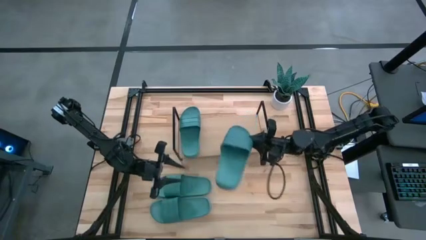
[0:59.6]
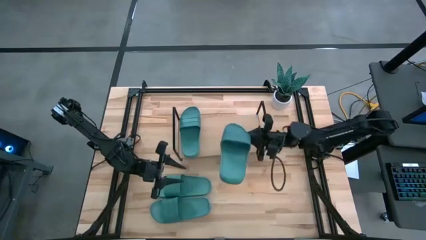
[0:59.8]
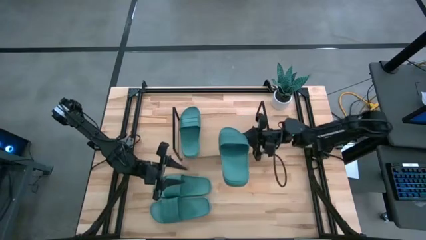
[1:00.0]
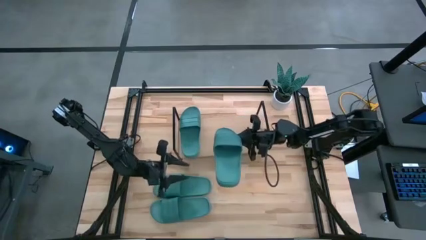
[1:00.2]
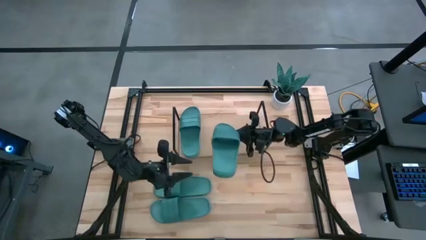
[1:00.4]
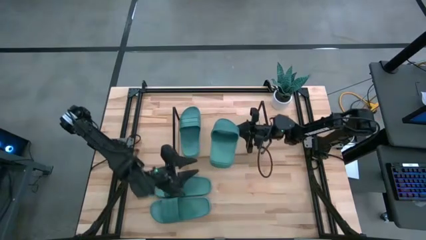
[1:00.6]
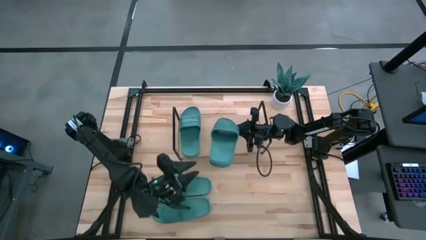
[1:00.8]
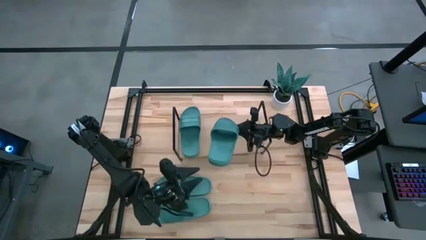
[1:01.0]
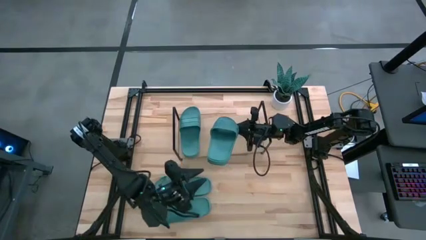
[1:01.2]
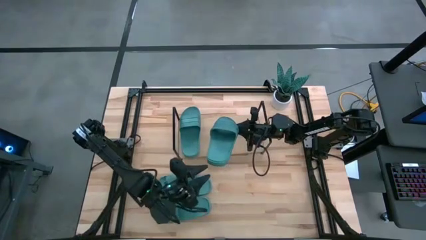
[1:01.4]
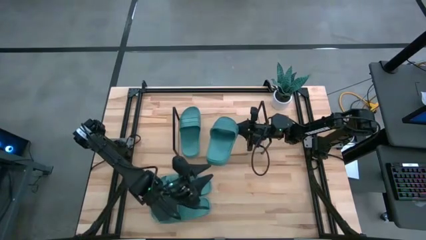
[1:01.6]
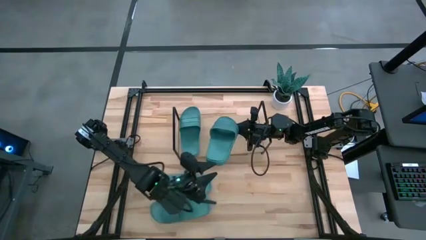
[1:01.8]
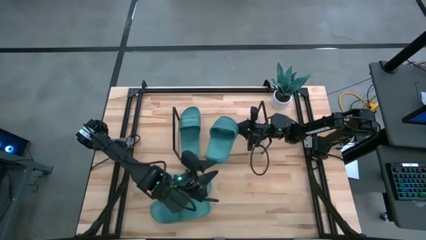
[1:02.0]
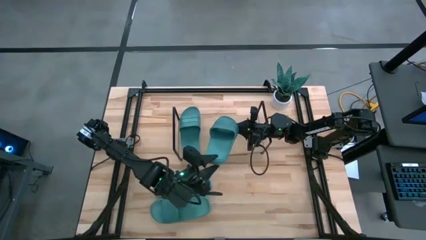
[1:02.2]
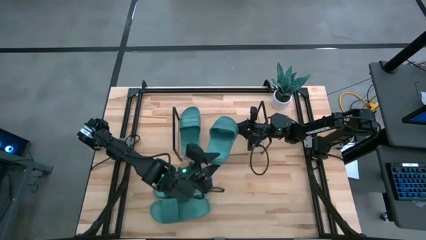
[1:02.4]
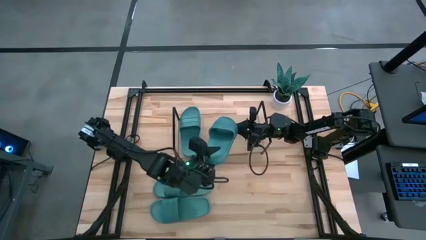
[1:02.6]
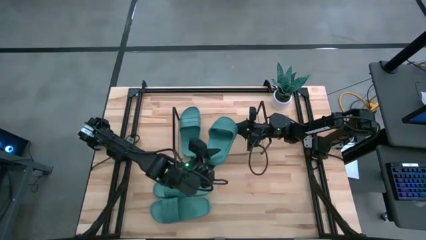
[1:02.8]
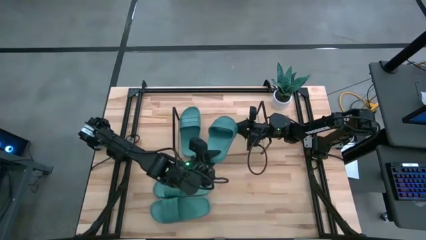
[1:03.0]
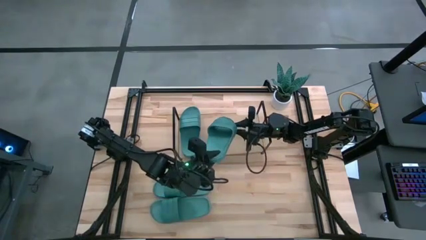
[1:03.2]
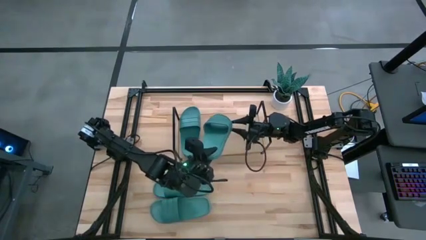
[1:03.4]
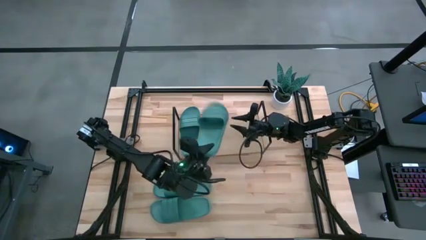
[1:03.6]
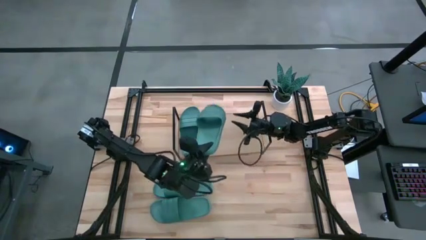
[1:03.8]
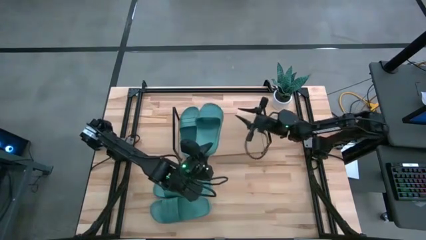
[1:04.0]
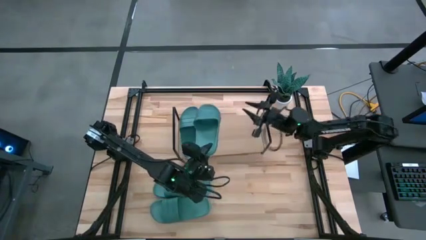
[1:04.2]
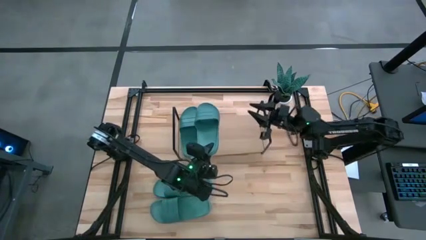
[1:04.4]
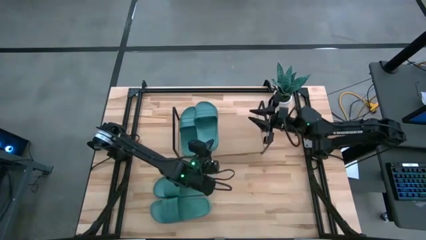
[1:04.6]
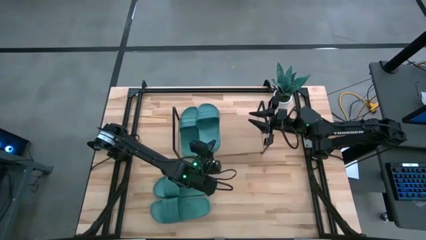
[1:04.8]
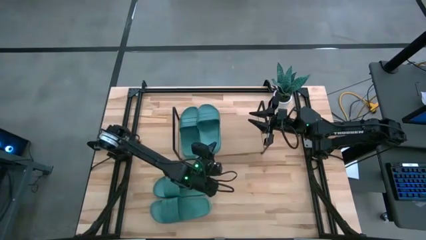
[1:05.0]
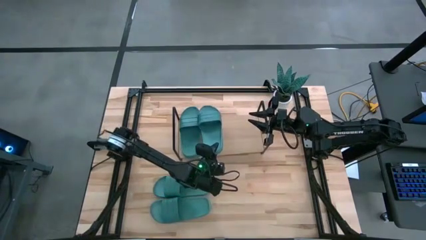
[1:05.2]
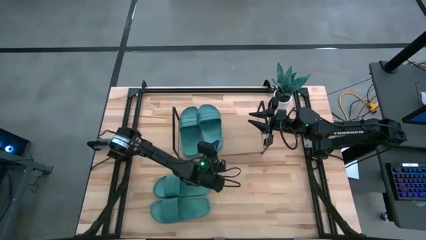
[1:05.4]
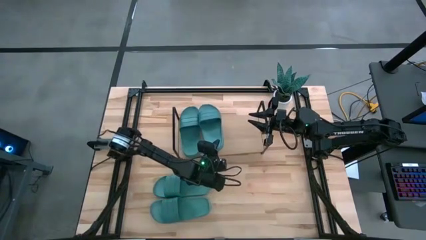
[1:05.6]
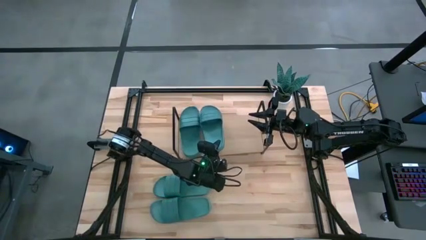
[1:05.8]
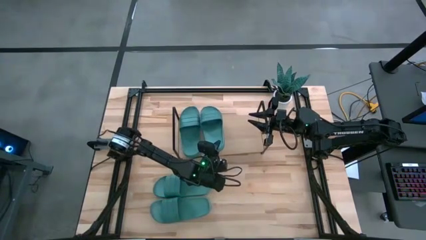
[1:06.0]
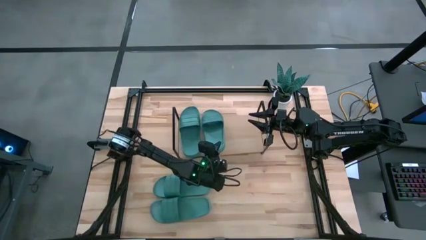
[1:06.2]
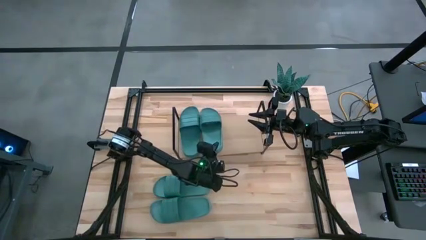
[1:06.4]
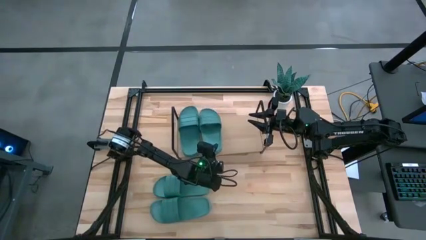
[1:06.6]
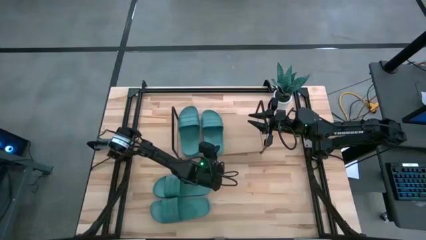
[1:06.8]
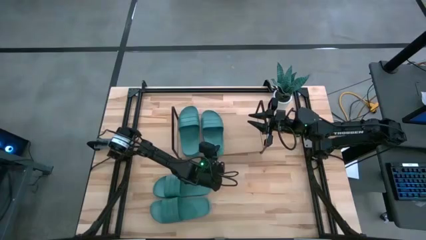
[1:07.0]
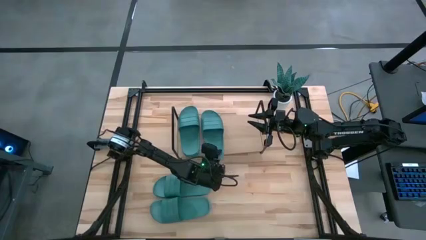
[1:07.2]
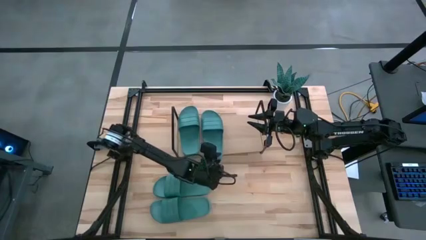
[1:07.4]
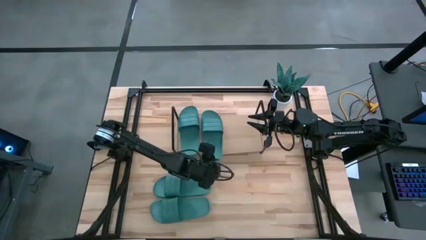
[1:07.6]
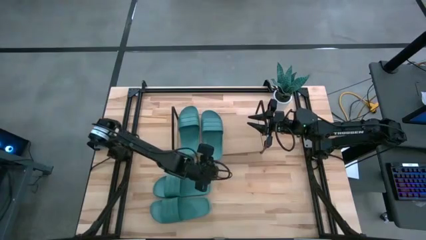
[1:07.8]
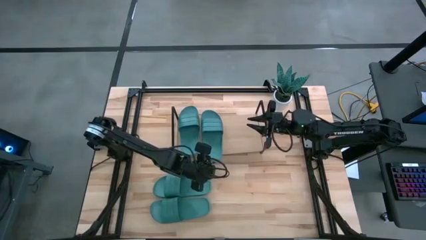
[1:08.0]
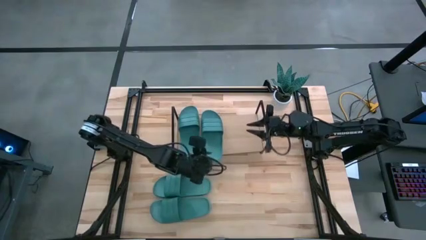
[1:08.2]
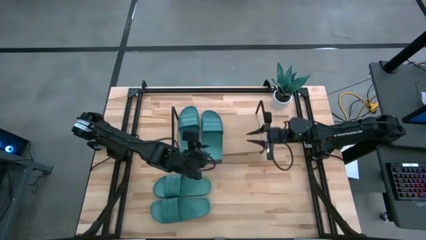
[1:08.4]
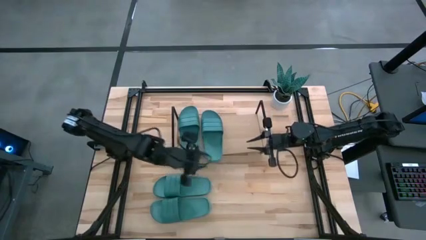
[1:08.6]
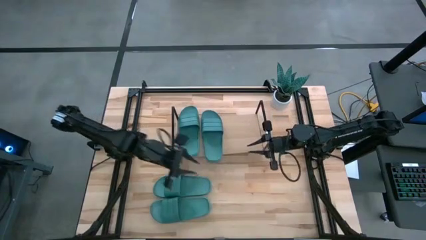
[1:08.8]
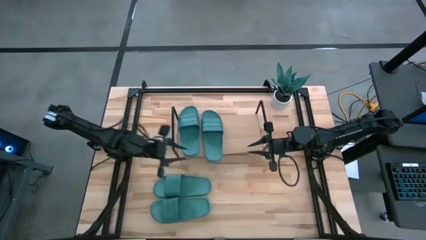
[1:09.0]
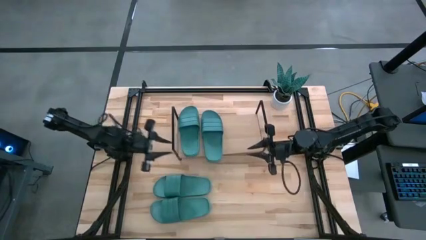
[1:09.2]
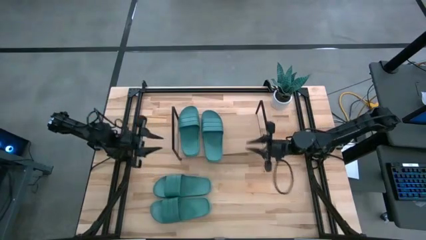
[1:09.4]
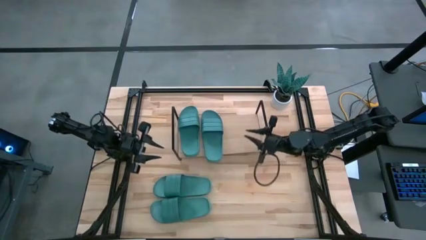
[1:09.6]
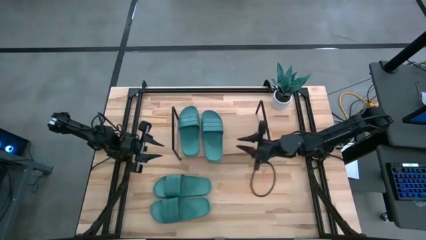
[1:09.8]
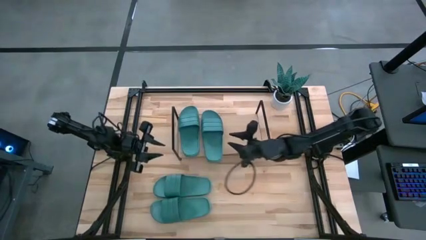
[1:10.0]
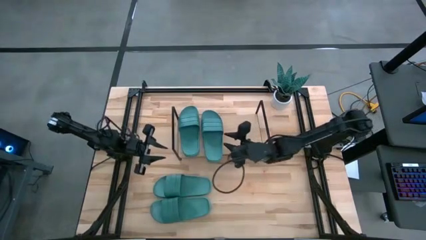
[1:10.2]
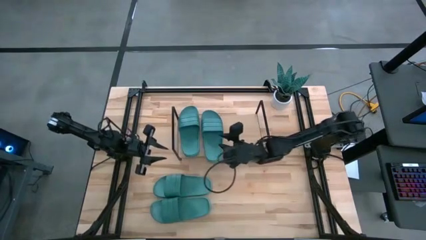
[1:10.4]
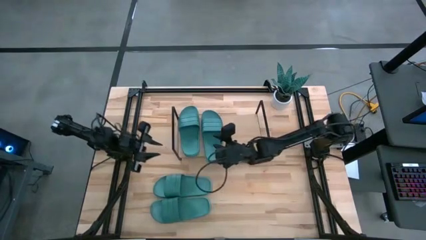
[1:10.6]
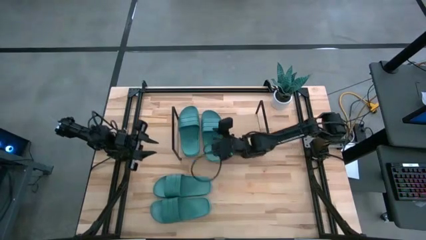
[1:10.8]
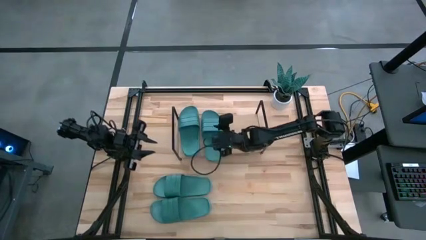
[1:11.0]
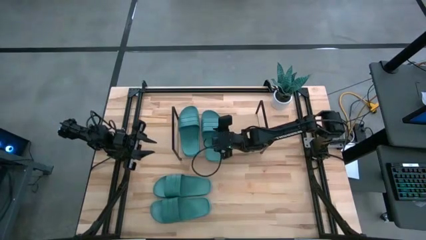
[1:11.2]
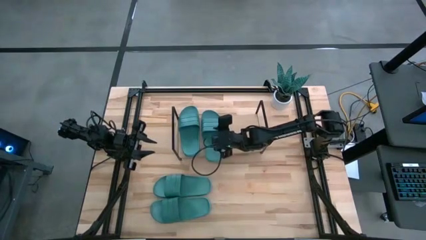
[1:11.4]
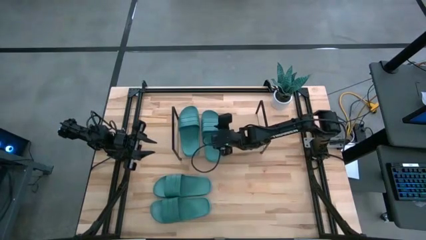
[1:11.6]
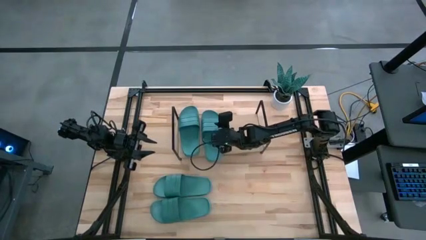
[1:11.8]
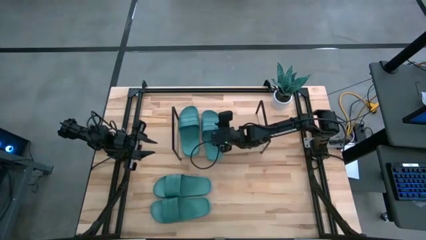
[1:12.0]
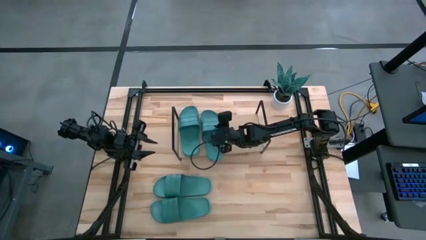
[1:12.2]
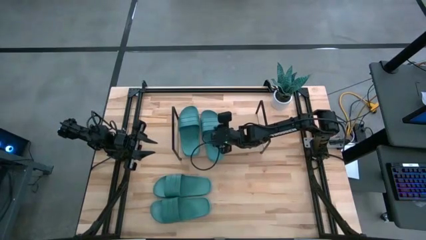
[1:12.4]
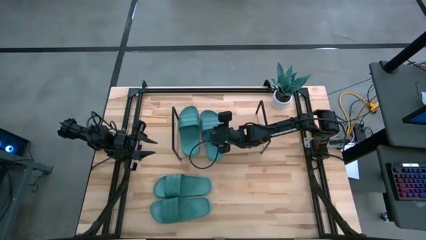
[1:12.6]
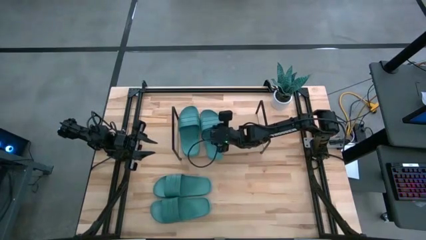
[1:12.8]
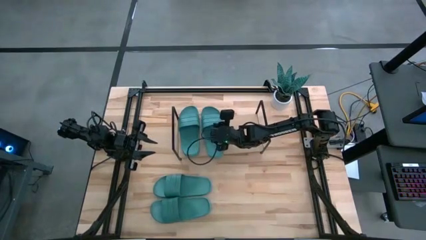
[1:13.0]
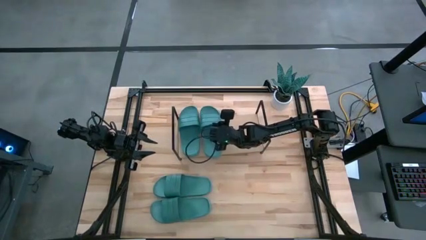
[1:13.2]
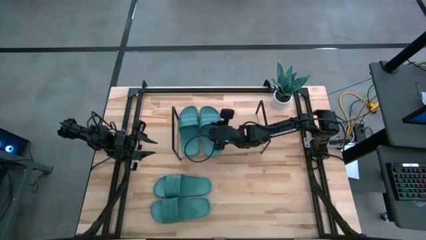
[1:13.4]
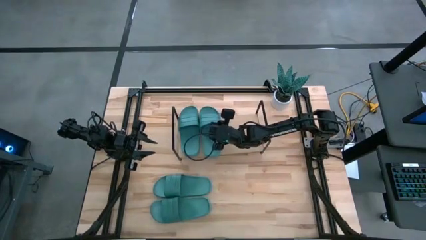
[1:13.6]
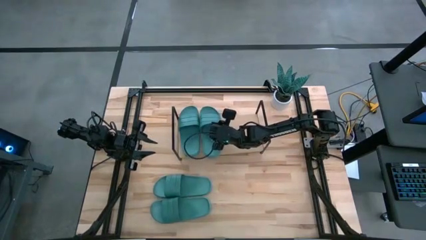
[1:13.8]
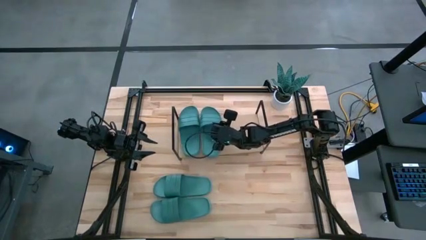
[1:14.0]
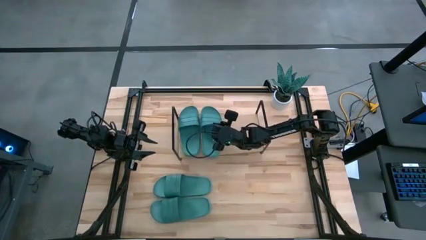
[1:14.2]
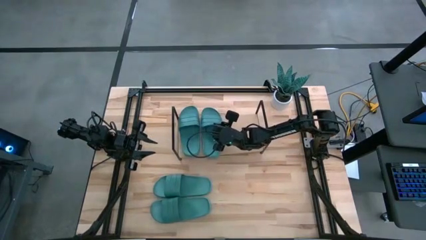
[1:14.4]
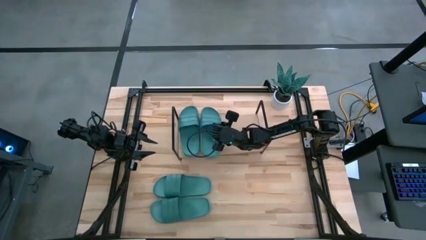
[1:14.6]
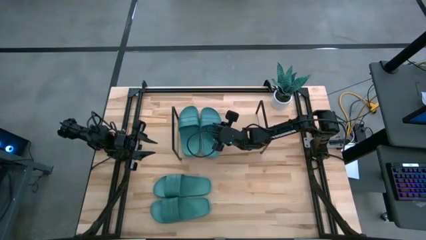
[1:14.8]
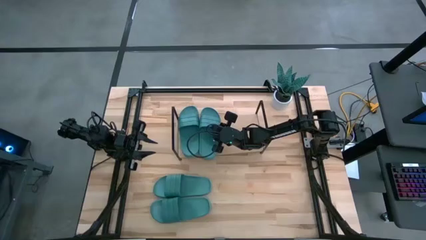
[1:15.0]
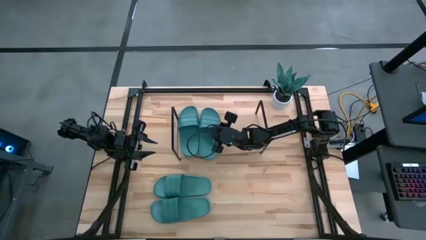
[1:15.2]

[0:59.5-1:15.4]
Task: Pick and place slides into the shelf
Put the green slipper on the shelf
